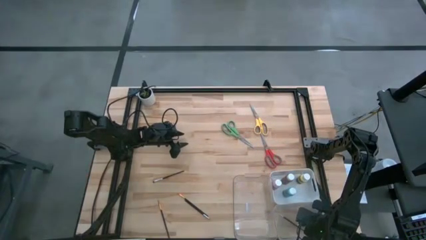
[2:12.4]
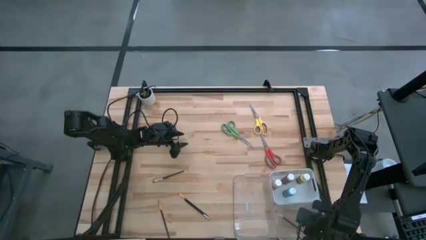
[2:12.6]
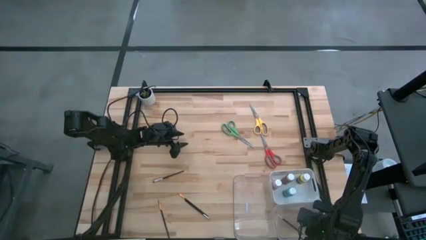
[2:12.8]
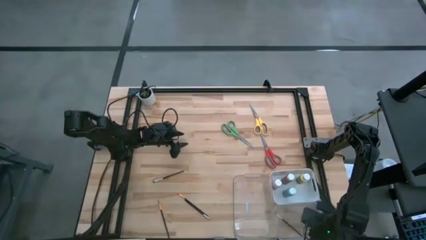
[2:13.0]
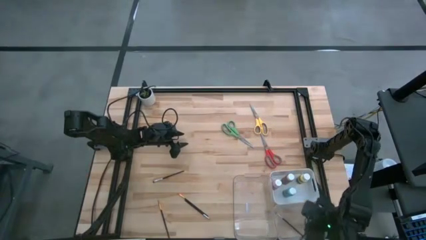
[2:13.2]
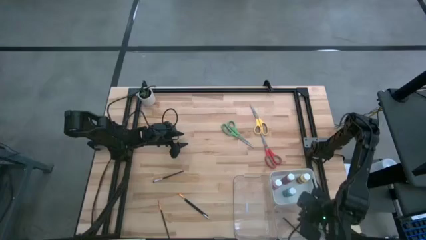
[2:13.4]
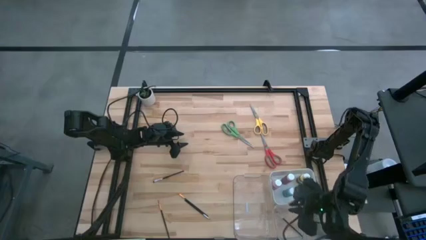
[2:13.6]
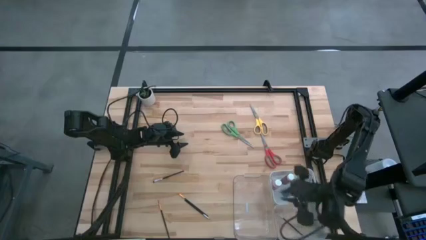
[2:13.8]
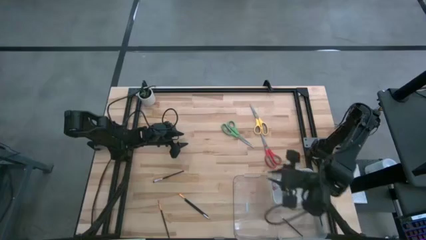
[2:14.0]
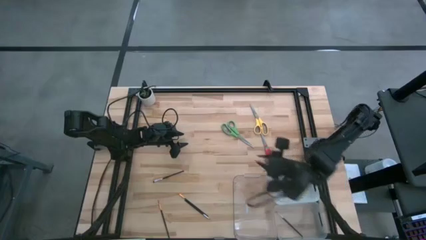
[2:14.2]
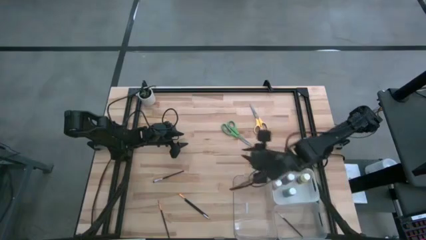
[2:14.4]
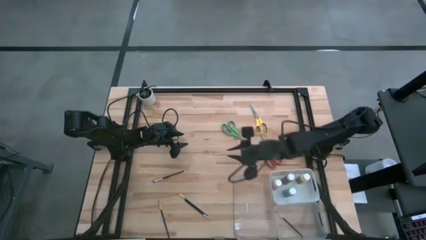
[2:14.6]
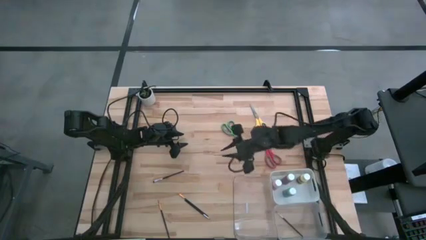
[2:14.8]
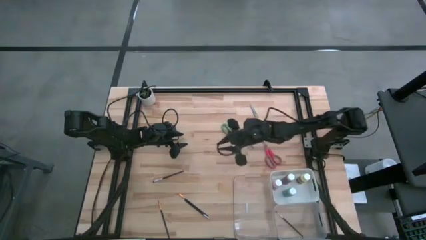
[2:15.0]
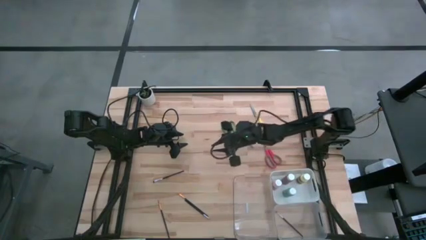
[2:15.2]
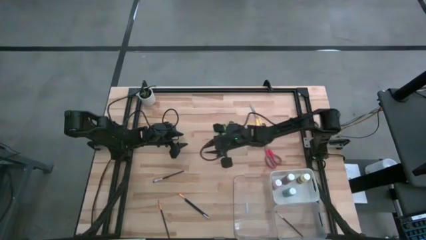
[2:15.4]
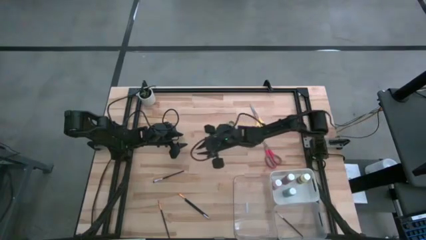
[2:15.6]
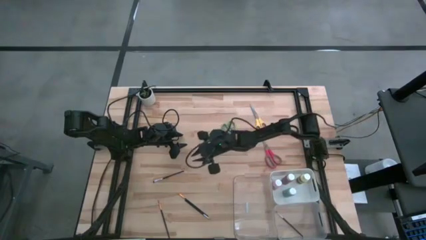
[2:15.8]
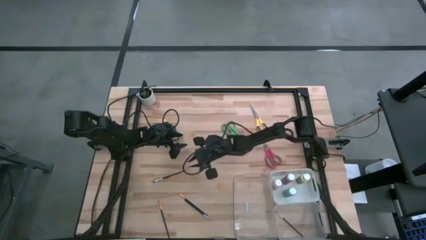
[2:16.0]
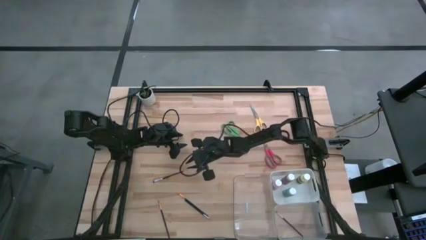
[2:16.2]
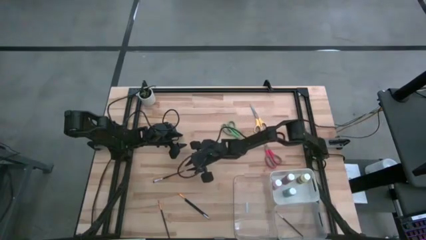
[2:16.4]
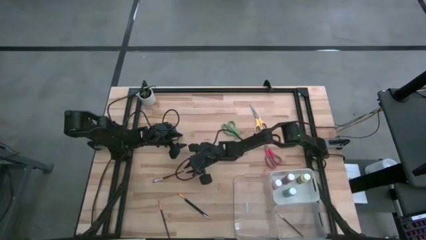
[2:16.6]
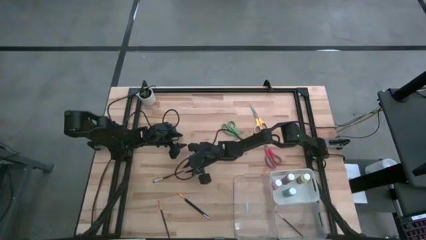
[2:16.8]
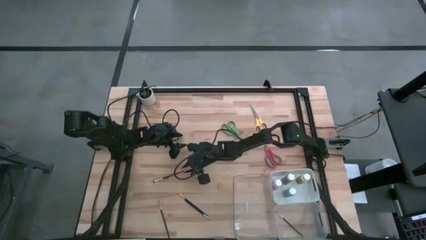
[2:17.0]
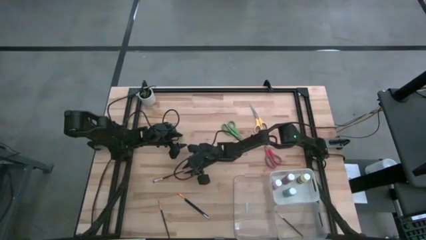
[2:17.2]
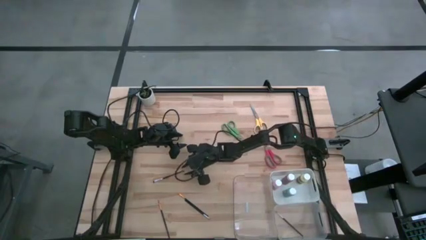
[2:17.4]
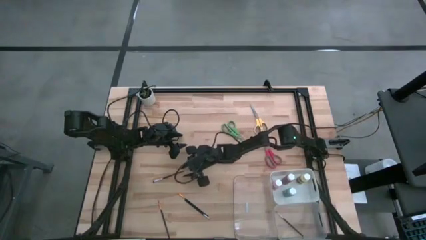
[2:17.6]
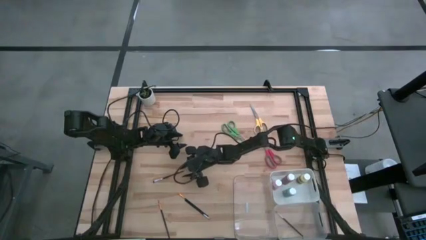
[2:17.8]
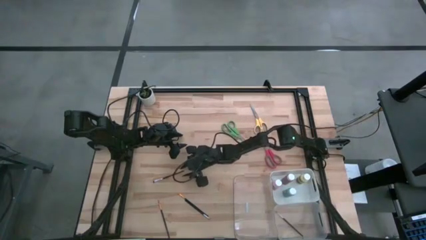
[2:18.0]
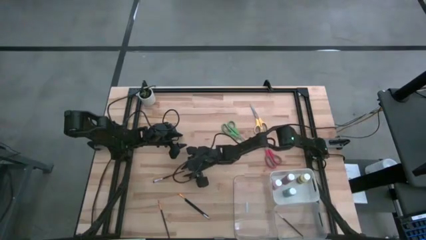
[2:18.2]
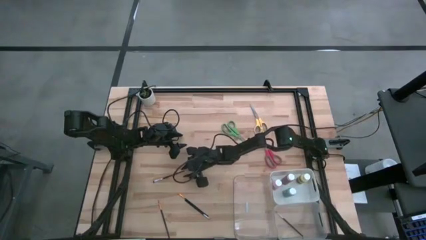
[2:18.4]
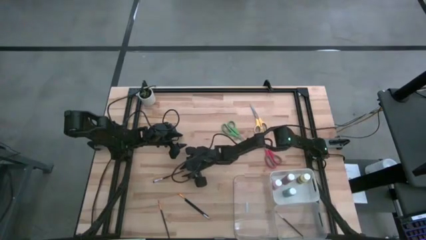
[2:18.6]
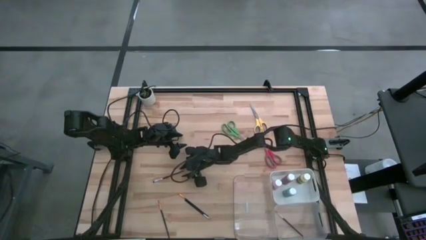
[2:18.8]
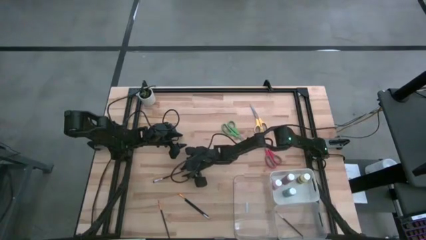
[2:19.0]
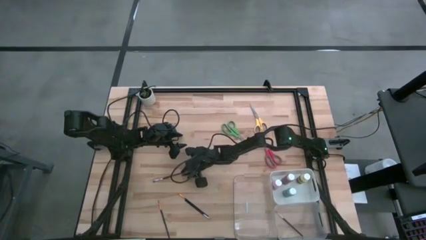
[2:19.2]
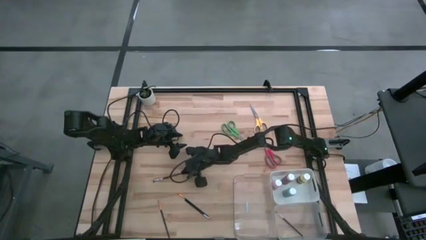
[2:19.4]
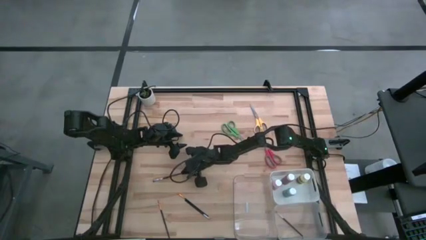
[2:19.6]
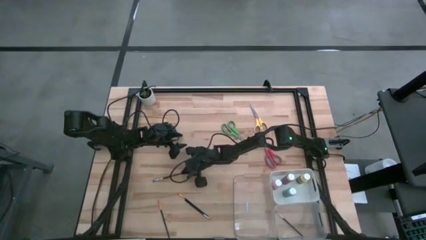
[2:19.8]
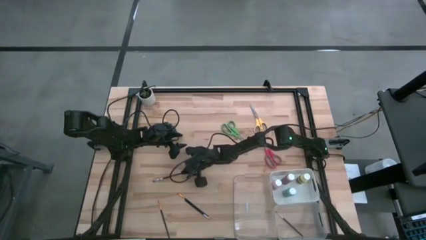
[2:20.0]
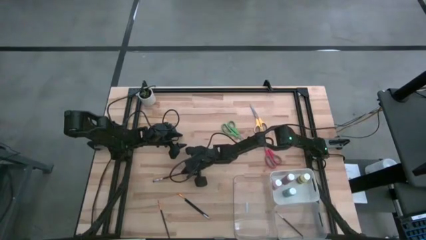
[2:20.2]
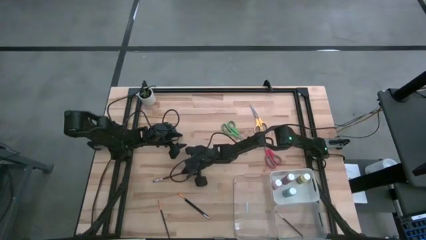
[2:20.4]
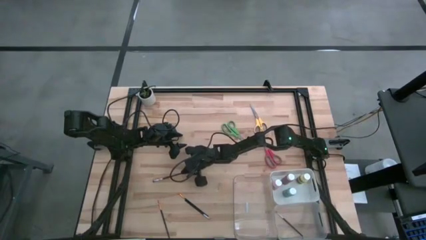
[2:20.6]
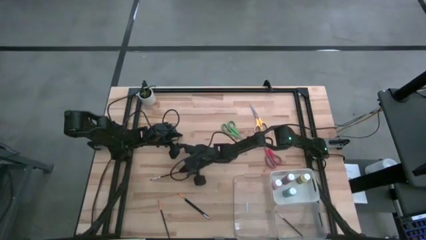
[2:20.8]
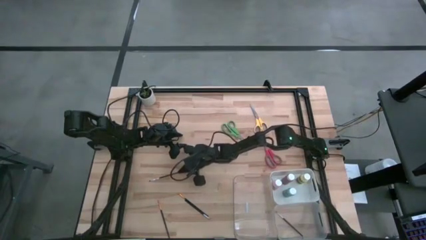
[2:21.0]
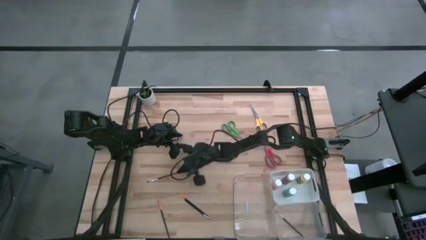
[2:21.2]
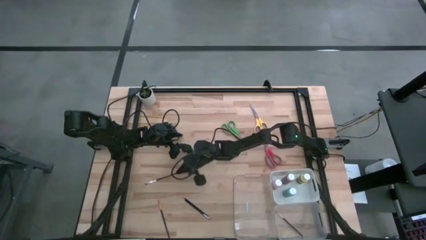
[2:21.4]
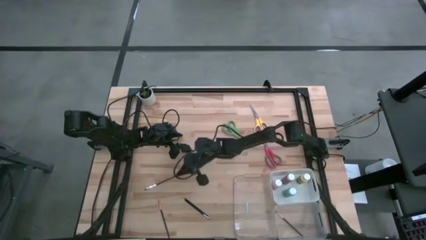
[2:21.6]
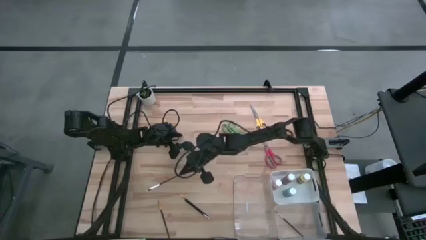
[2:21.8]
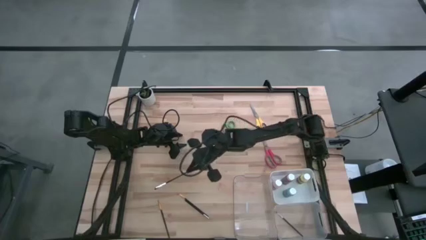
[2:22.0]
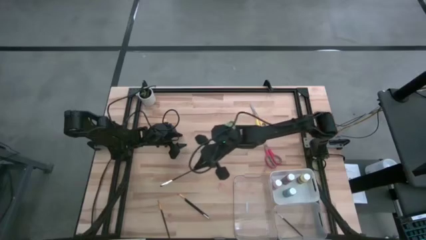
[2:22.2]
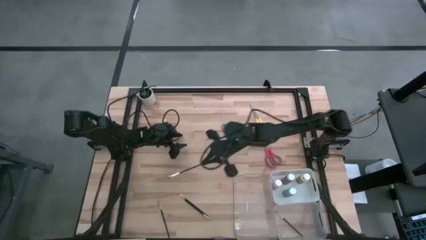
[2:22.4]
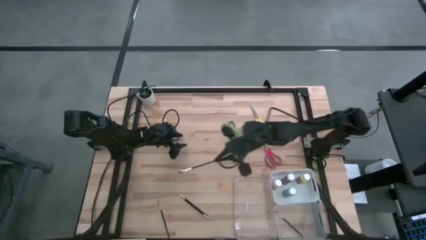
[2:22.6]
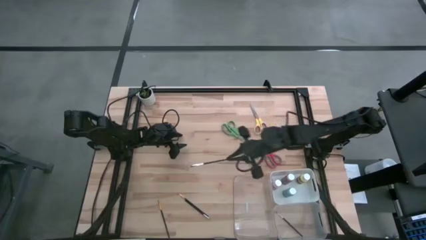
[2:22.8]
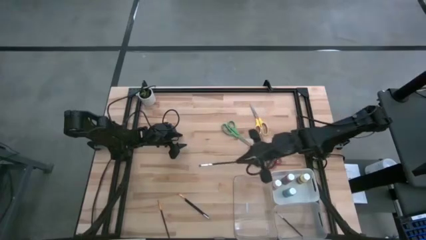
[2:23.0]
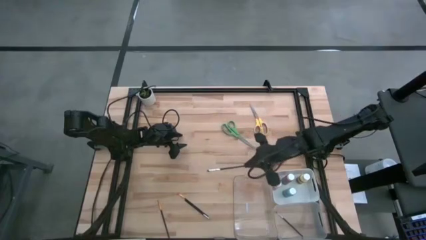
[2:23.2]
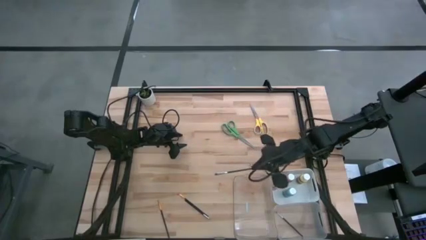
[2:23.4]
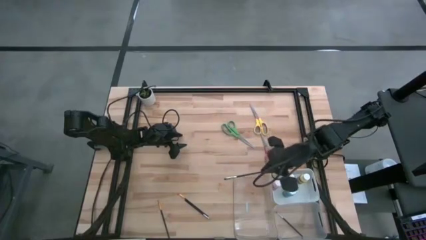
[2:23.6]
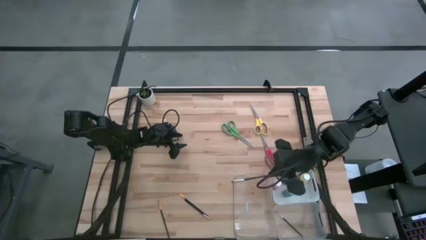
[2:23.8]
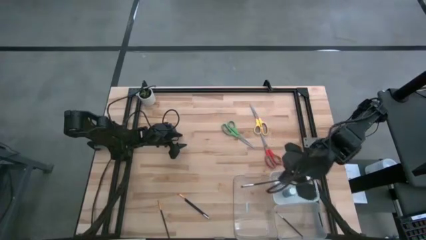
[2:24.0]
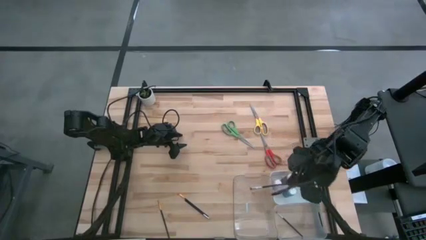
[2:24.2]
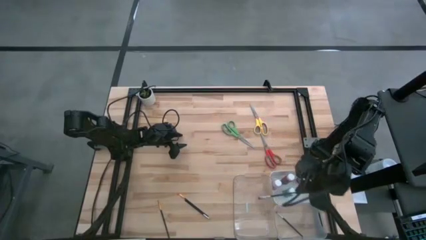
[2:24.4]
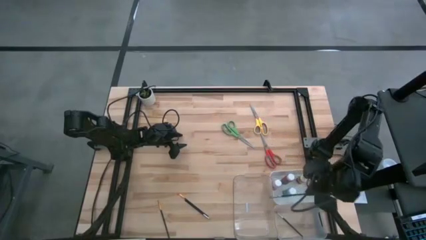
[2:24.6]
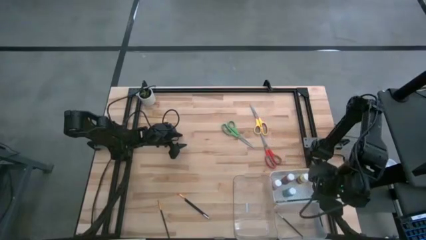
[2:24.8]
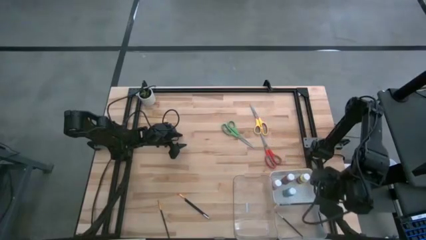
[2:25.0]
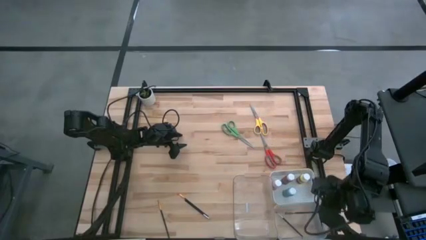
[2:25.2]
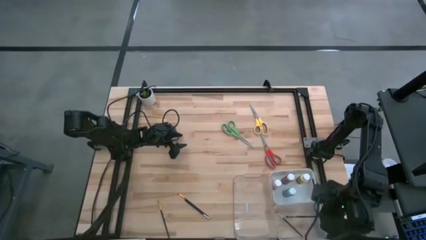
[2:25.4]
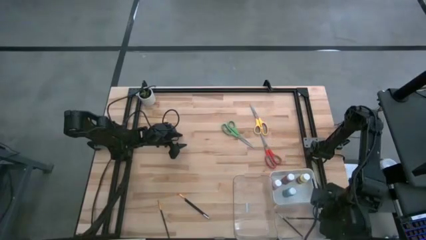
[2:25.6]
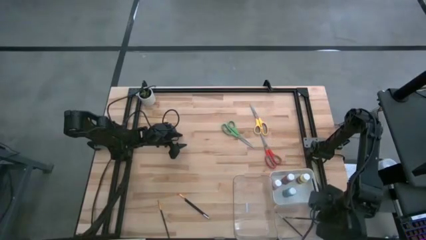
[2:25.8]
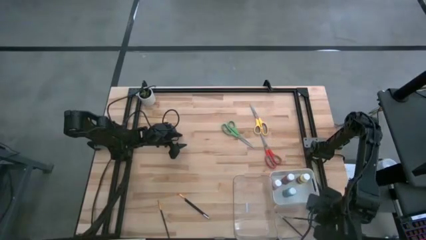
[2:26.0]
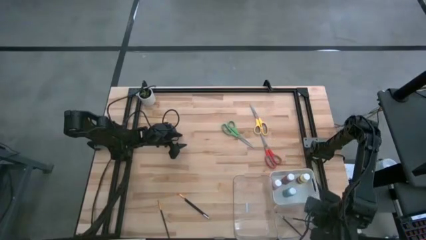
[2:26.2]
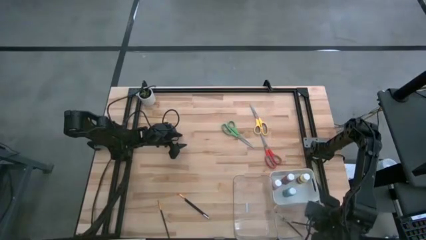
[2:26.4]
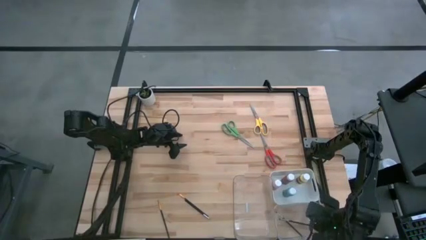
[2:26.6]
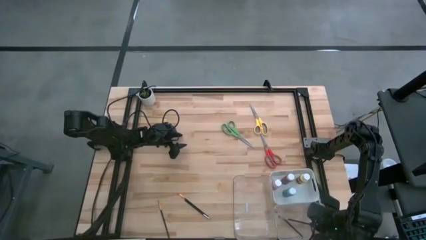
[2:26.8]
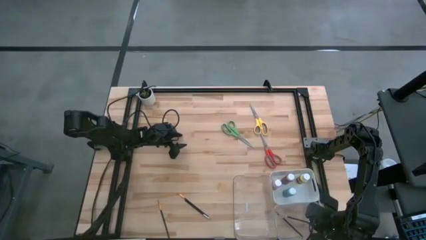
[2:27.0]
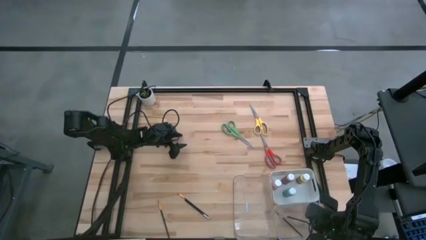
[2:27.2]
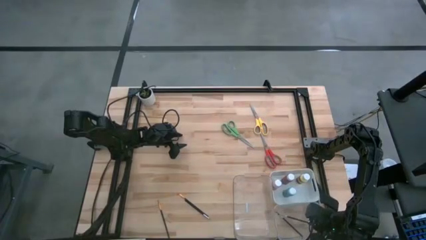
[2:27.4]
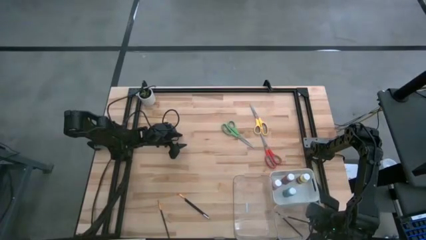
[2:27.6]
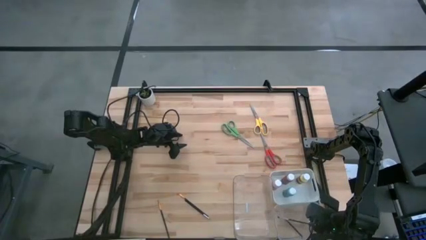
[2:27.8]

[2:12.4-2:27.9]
Task: Pick & Place Paint Supplies
Put the top silver paintbrush into the right transparent bin

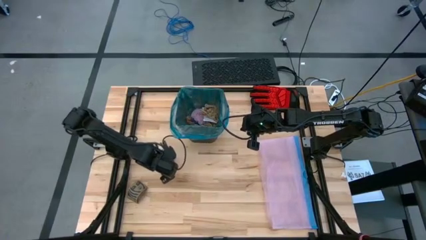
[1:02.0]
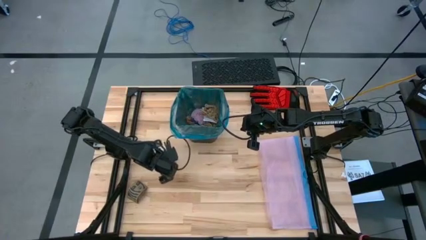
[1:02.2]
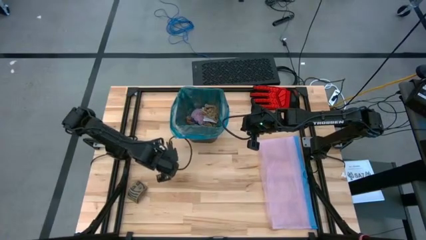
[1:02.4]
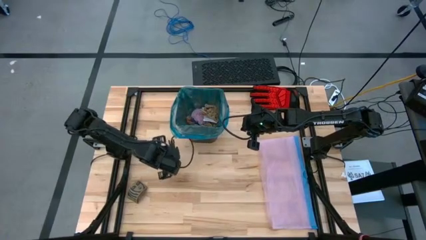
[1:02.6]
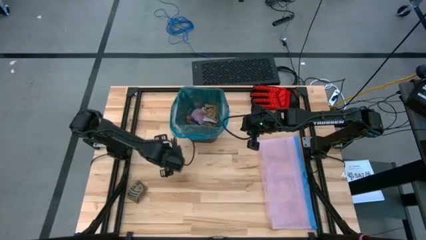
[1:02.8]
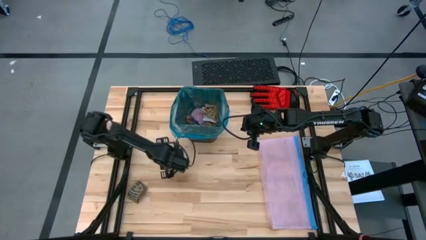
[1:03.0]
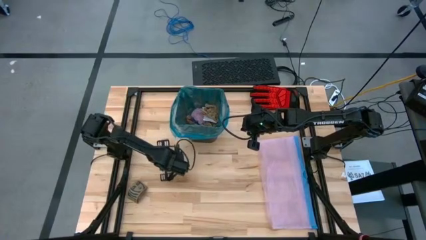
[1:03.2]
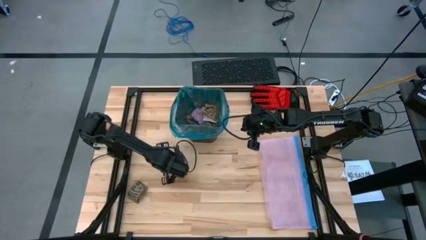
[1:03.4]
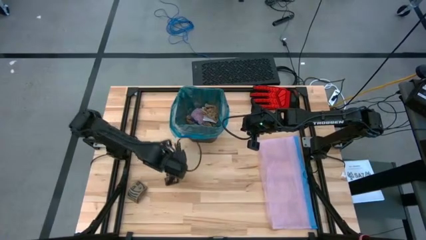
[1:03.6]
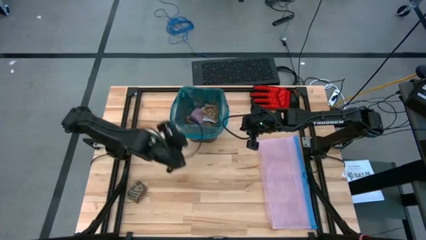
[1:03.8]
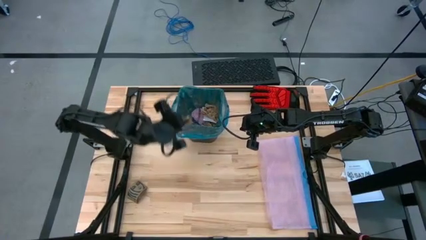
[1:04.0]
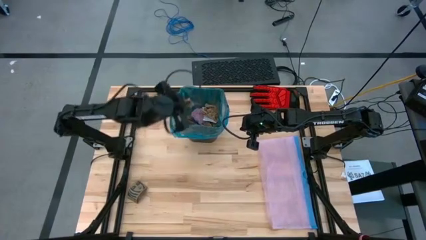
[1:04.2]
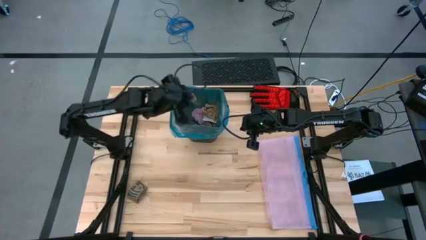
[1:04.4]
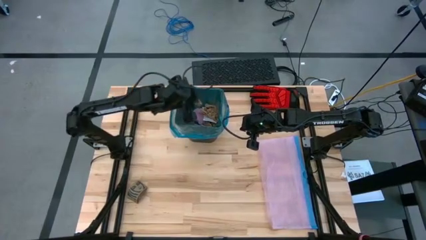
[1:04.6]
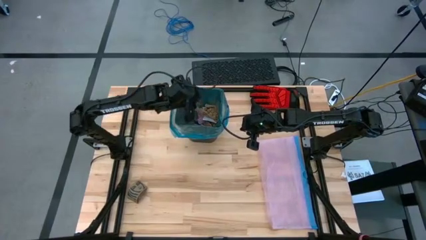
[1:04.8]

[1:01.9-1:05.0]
Task: place trash/remove bag and relplace
Put the brown napkin into the black trash bin
